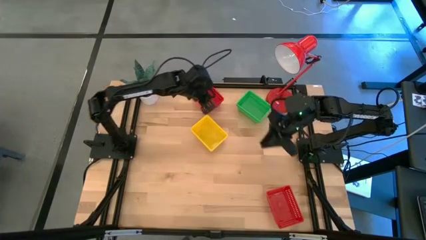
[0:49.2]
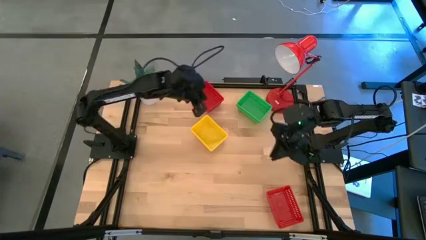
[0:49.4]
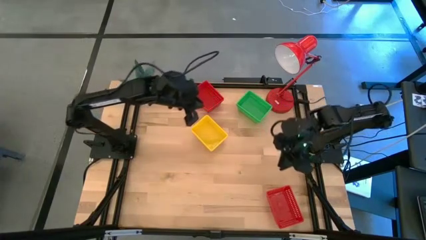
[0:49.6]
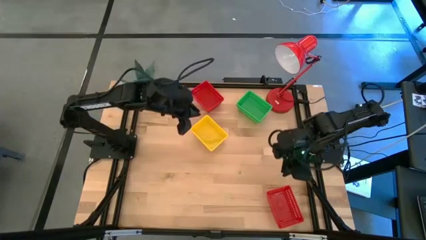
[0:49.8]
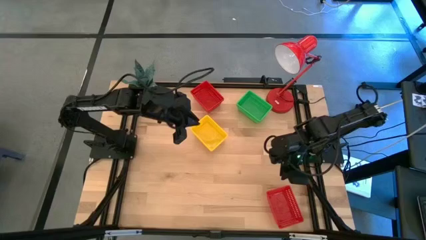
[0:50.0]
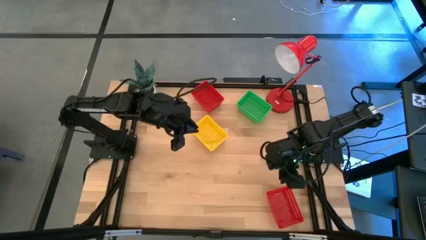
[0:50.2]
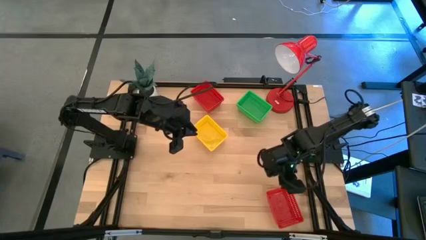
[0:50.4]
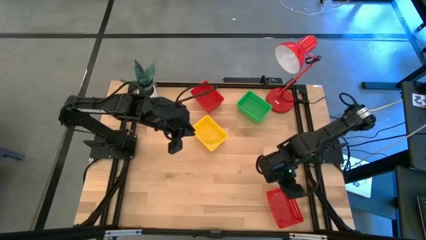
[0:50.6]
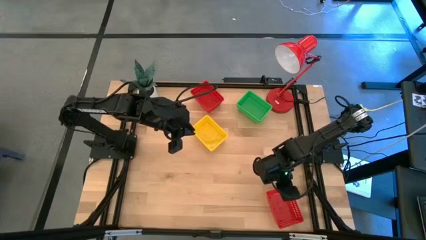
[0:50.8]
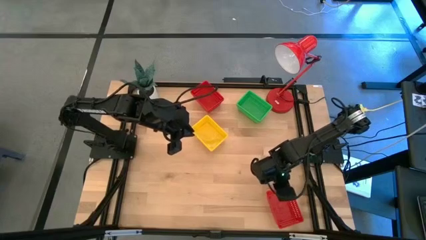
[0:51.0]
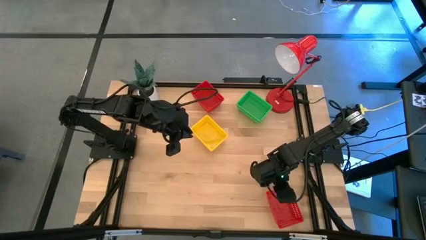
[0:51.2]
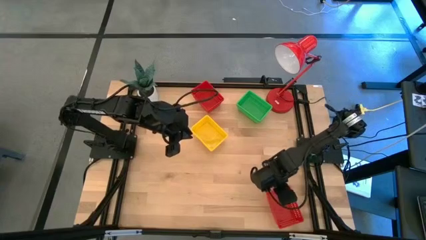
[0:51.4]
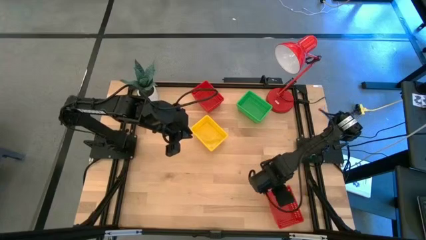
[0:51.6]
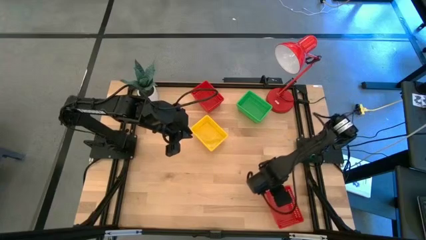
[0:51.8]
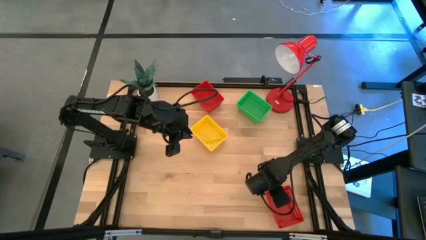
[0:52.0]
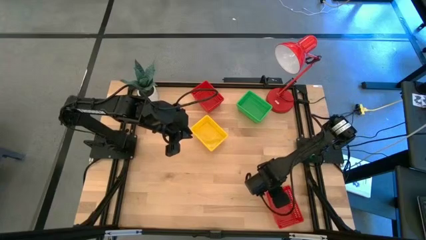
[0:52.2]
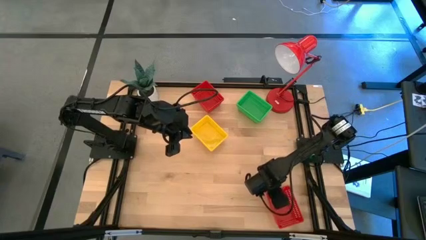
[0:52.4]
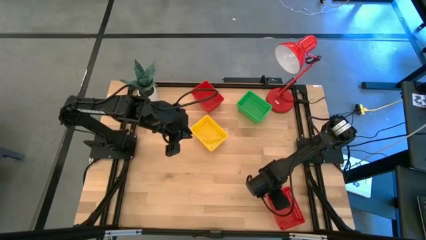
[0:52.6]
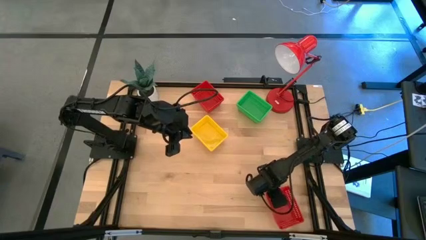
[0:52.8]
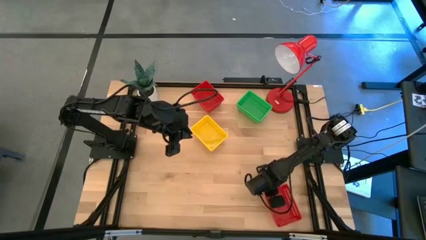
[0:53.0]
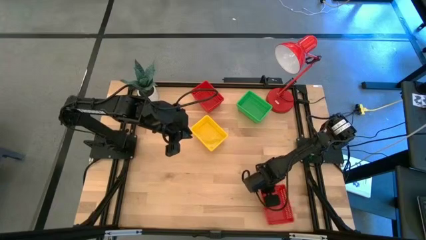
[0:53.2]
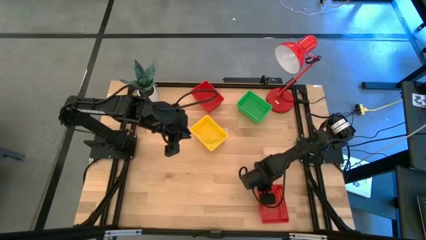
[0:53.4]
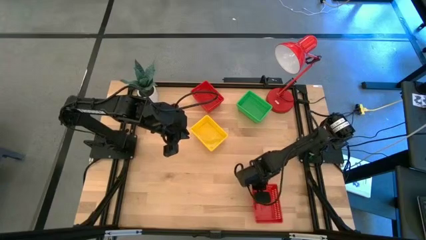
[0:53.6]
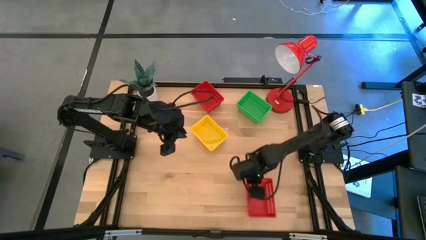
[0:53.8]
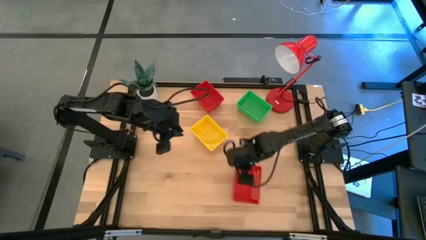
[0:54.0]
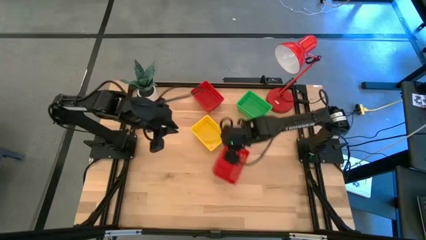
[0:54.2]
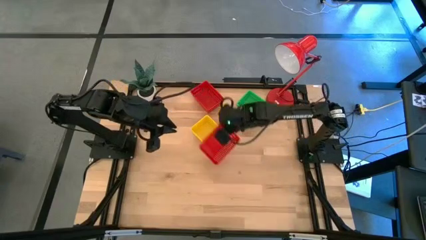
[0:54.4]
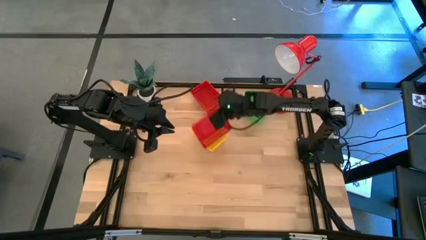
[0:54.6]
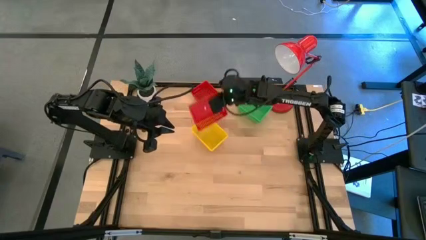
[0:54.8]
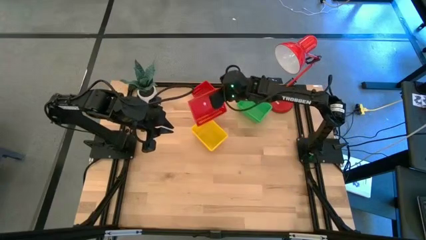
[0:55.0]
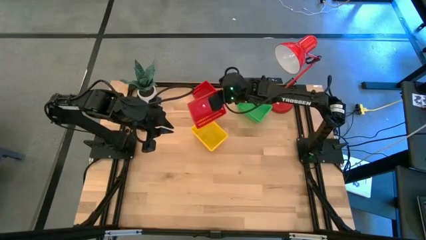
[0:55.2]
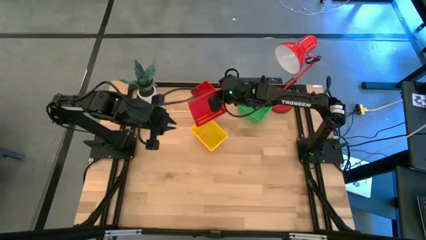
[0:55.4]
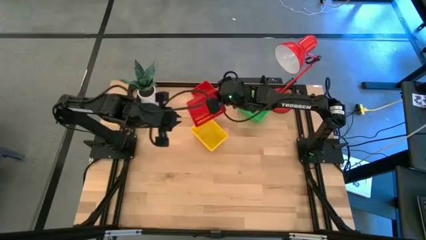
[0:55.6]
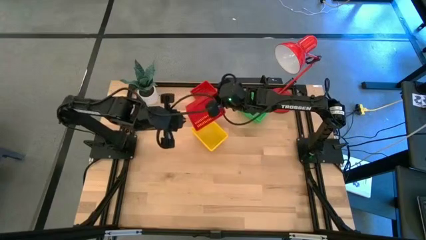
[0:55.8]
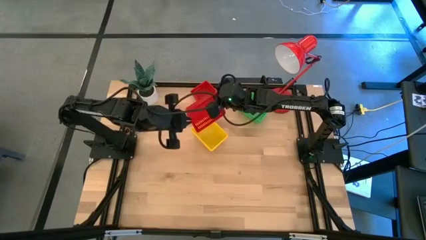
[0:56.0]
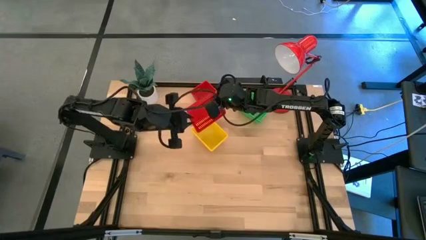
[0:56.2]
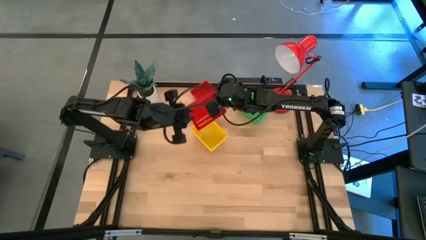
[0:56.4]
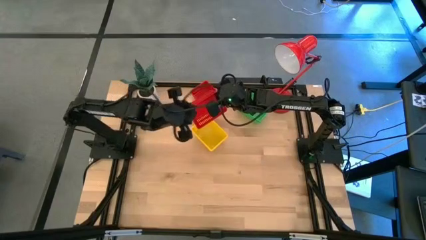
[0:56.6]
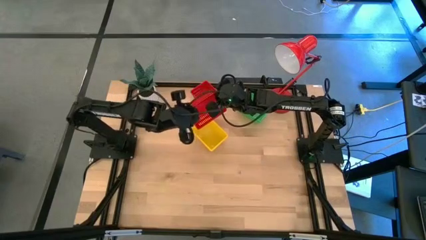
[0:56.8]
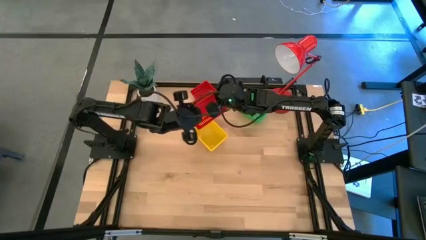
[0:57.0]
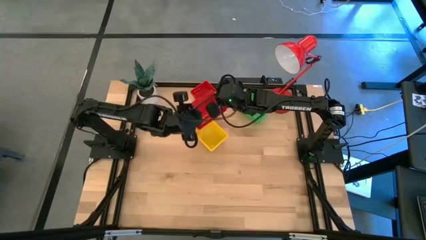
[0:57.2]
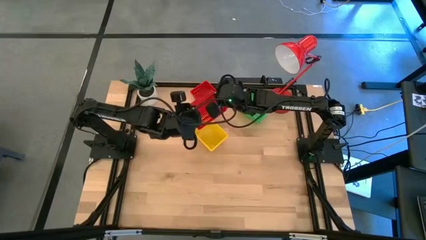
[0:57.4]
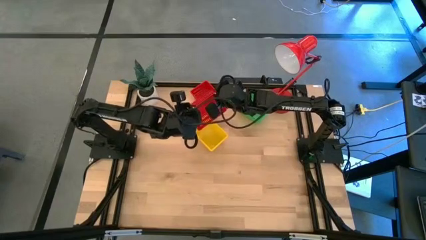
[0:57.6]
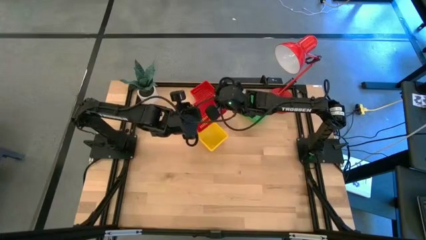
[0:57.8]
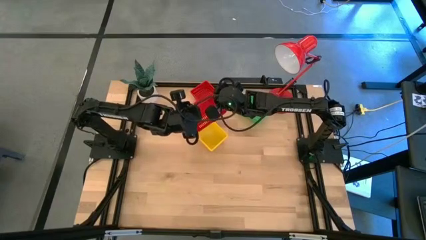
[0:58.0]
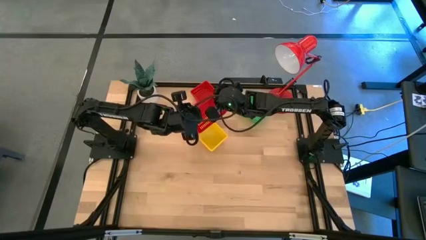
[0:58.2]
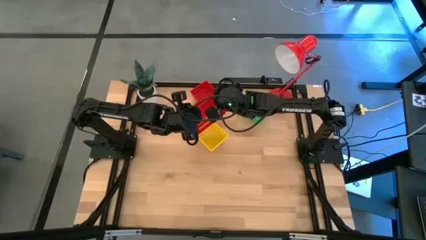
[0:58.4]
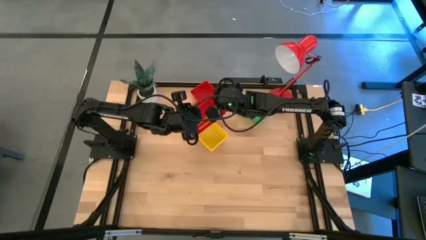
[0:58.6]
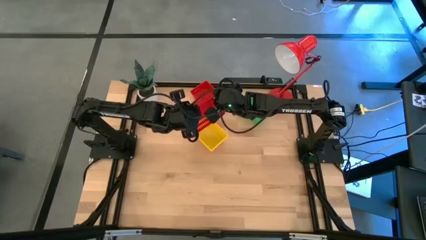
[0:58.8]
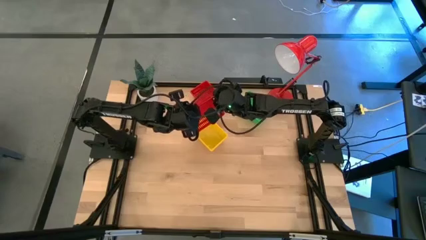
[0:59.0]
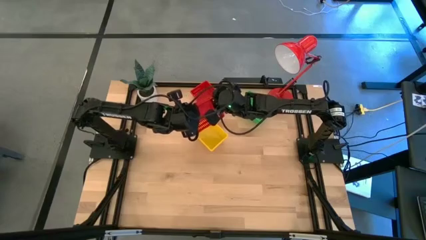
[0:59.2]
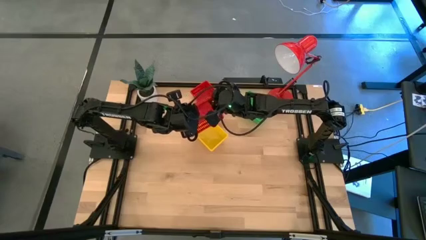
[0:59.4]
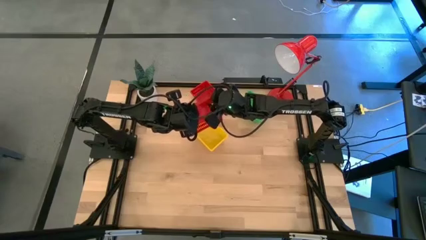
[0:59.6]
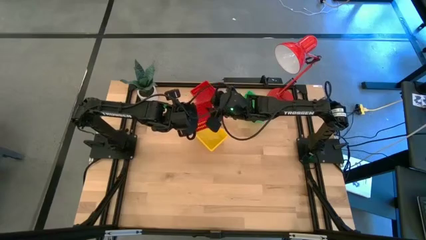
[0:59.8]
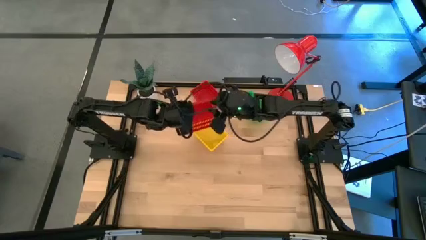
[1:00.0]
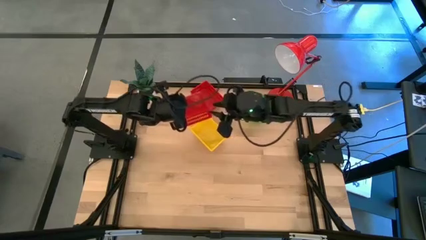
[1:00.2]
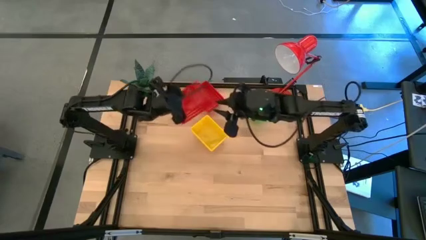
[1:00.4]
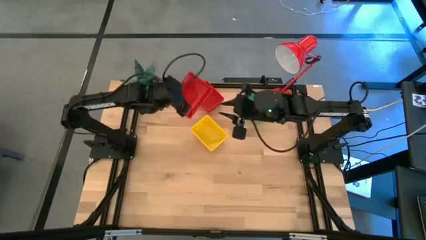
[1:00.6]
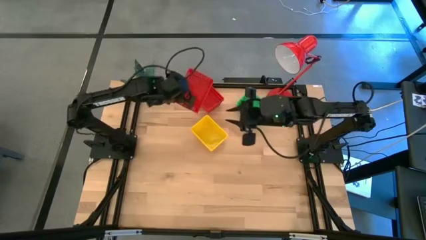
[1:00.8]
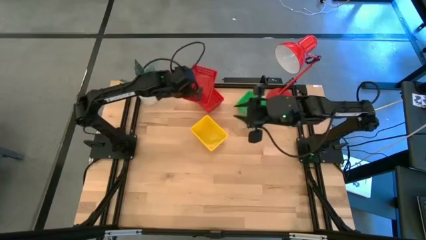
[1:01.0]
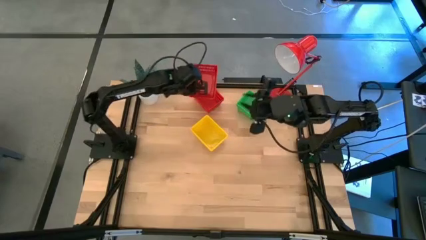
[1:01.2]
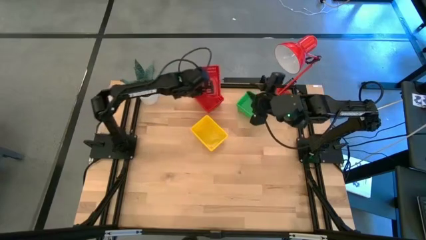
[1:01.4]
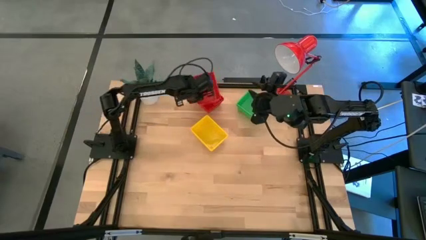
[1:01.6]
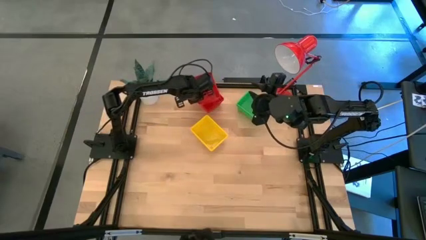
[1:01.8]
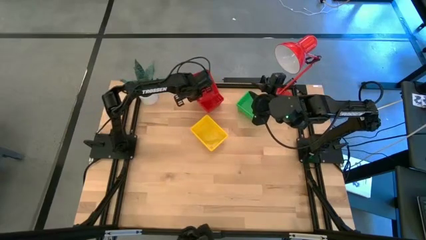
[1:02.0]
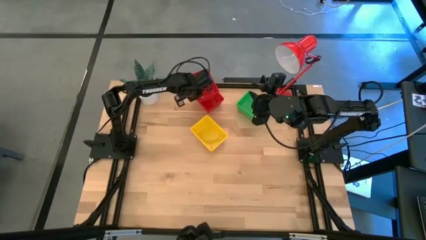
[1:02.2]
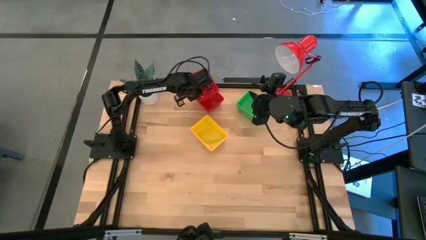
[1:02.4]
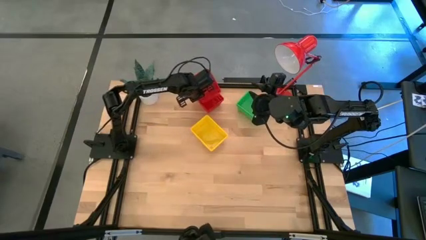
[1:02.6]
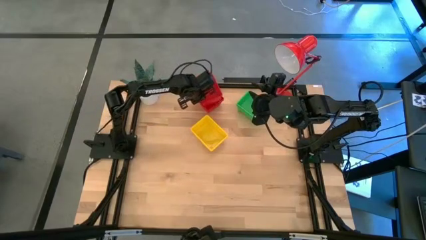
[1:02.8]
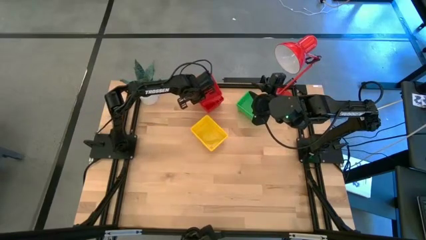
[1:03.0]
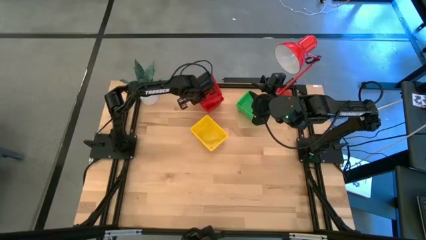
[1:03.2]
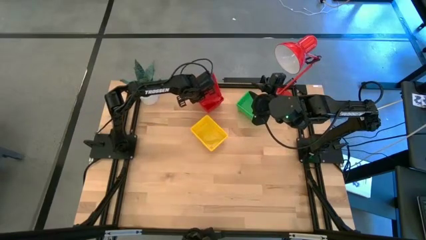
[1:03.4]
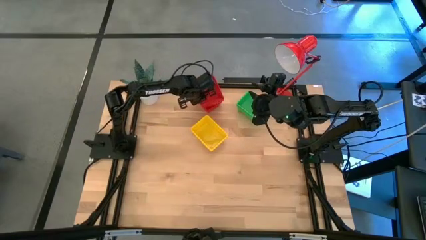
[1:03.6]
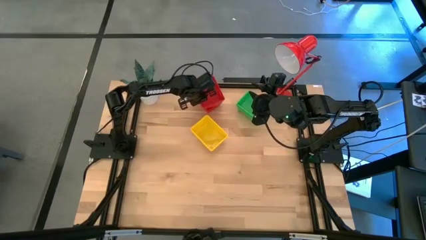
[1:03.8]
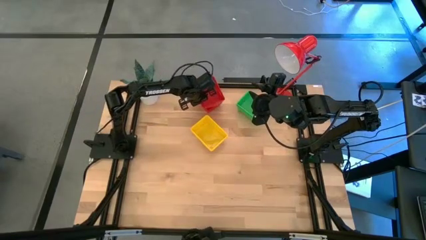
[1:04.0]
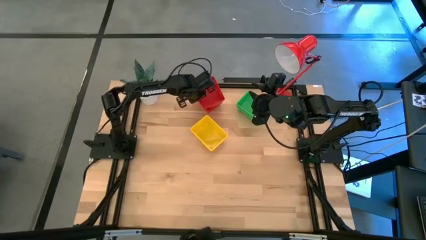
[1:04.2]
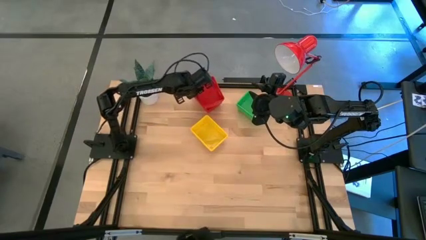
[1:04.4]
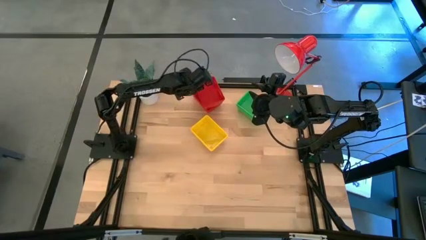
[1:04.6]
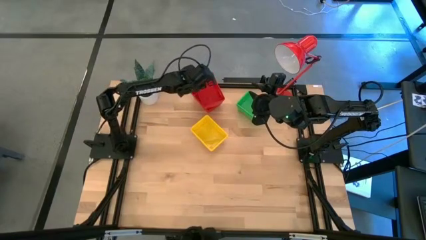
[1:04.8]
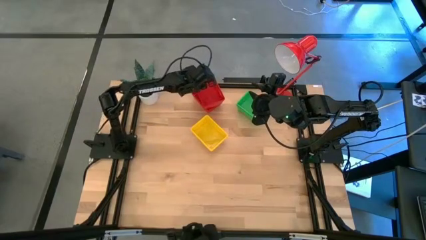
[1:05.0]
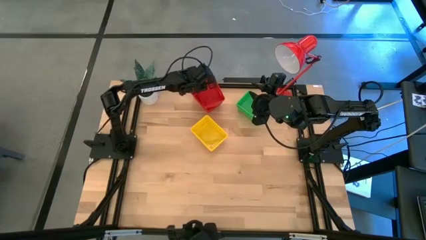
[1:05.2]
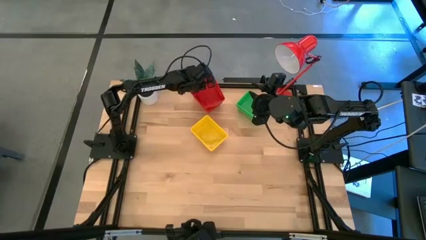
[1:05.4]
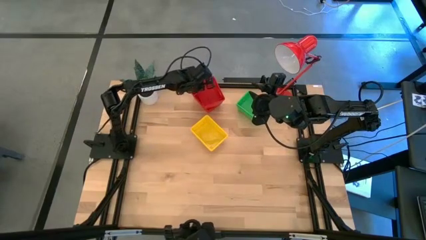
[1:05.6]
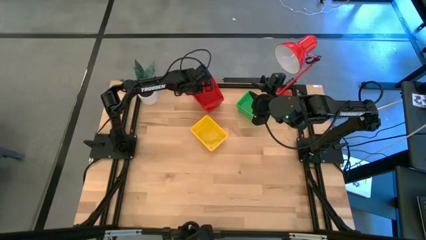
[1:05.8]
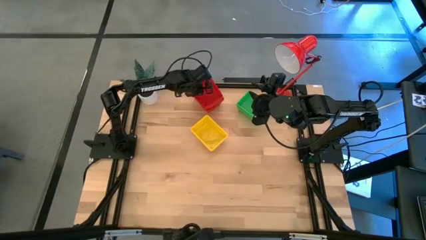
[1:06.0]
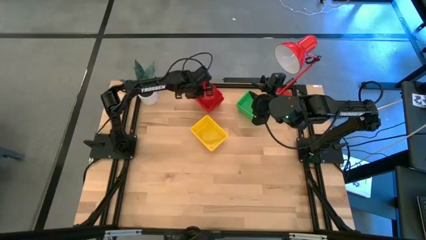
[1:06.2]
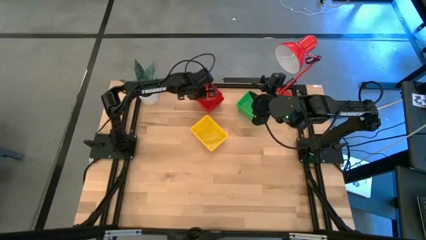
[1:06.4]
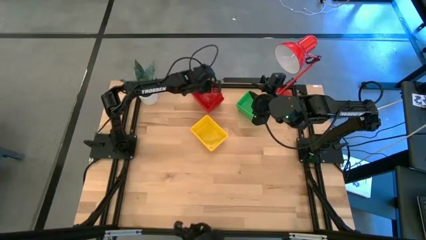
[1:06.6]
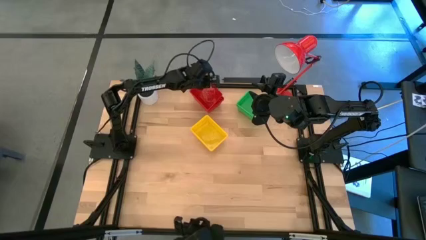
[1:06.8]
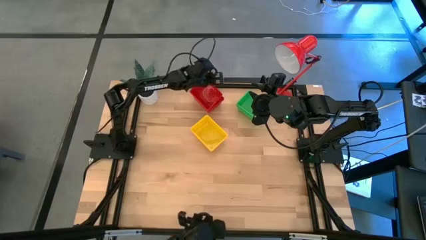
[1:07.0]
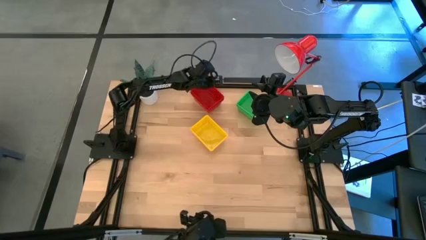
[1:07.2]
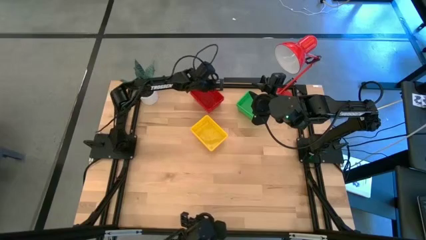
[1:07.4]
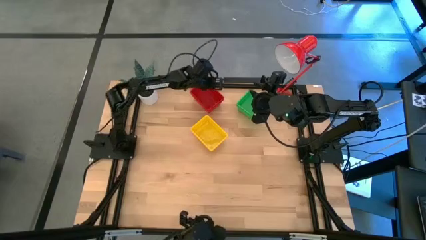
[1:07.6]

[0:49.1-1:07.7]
Stack the red bin on the red bin
